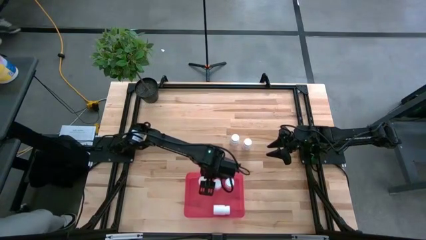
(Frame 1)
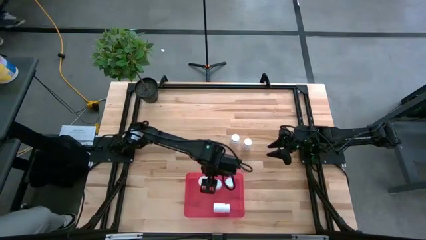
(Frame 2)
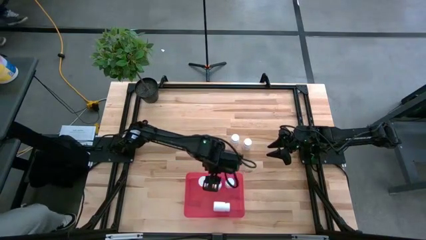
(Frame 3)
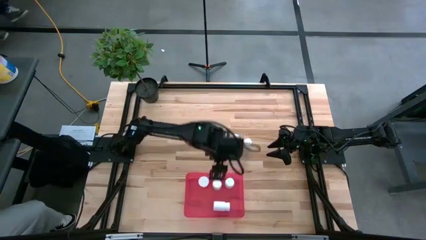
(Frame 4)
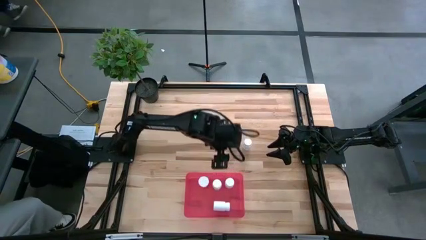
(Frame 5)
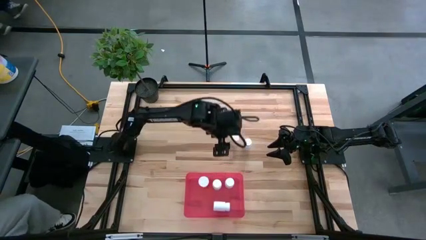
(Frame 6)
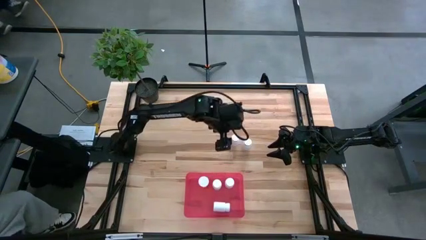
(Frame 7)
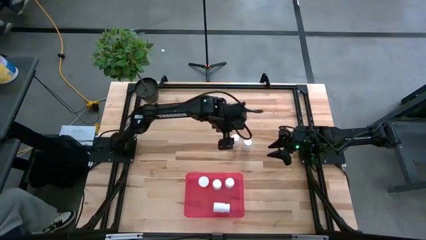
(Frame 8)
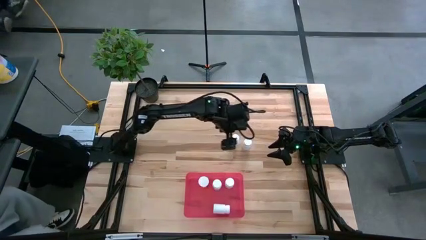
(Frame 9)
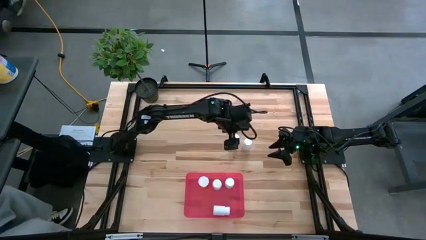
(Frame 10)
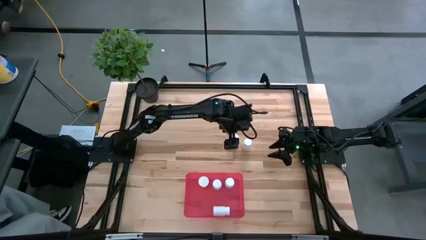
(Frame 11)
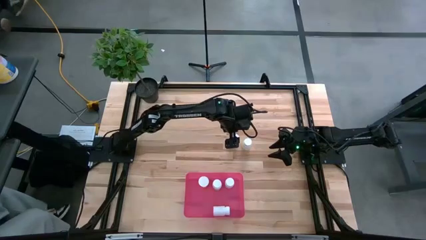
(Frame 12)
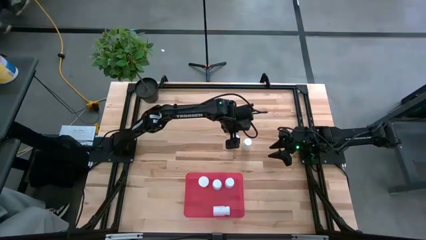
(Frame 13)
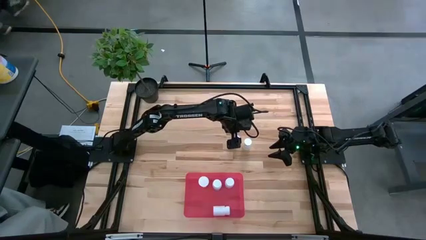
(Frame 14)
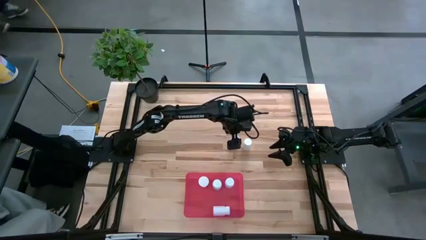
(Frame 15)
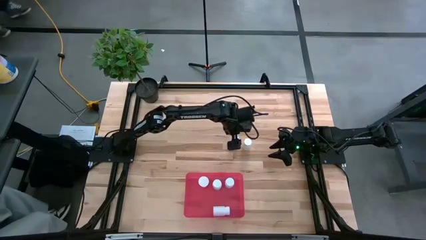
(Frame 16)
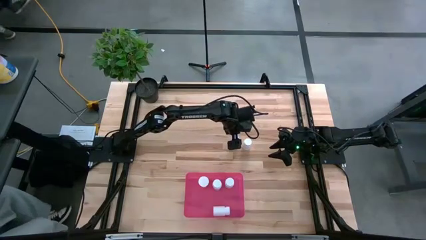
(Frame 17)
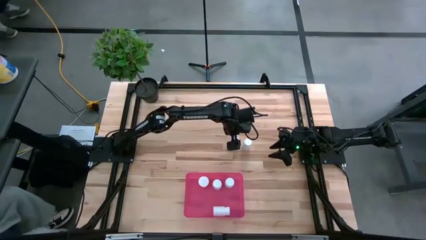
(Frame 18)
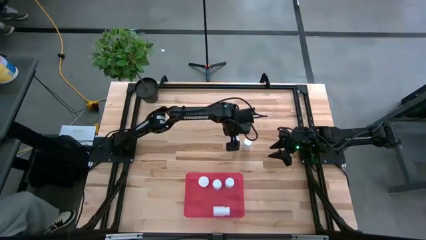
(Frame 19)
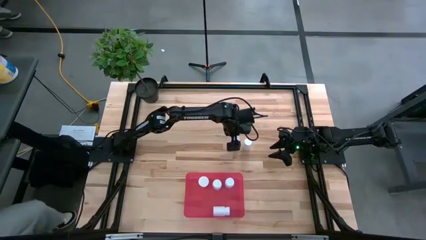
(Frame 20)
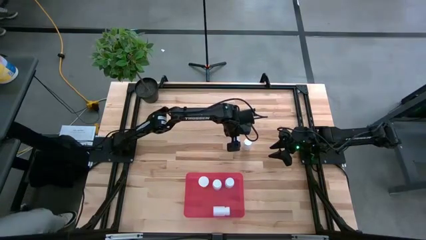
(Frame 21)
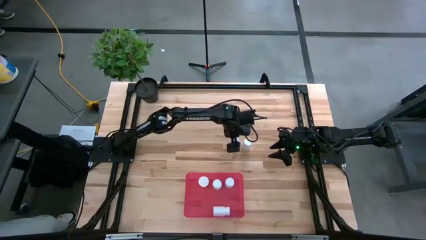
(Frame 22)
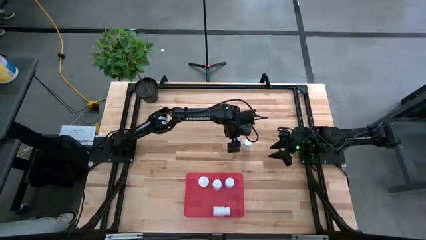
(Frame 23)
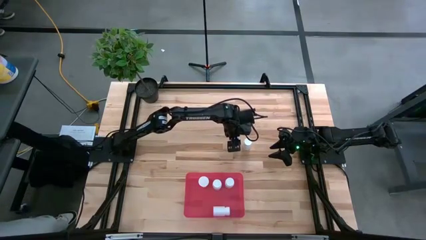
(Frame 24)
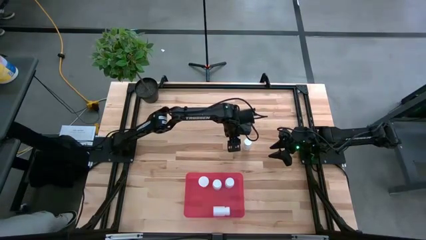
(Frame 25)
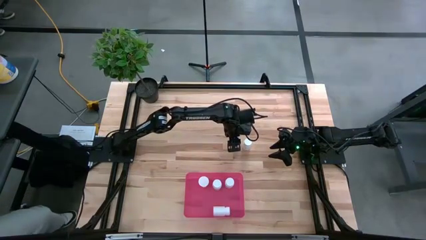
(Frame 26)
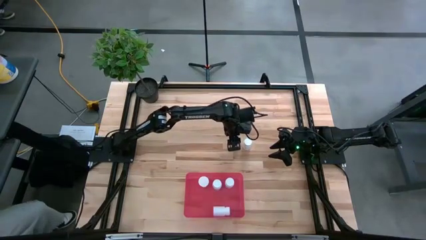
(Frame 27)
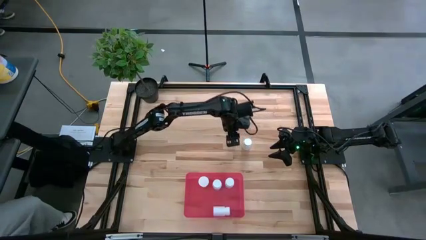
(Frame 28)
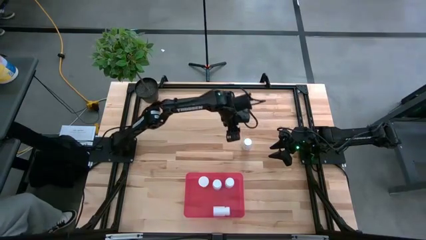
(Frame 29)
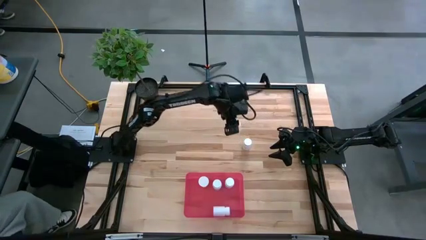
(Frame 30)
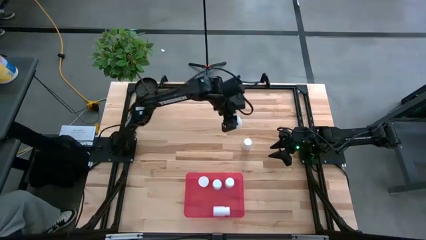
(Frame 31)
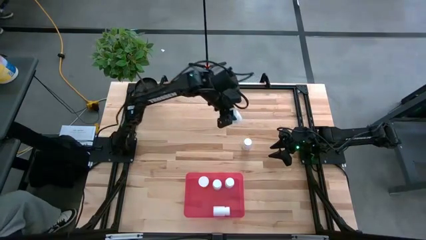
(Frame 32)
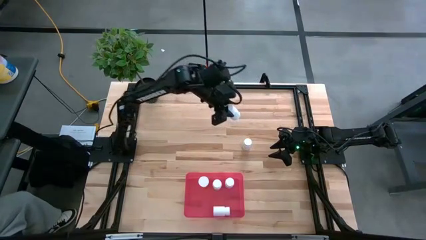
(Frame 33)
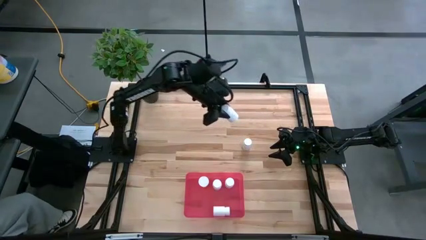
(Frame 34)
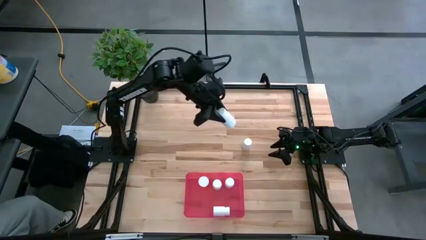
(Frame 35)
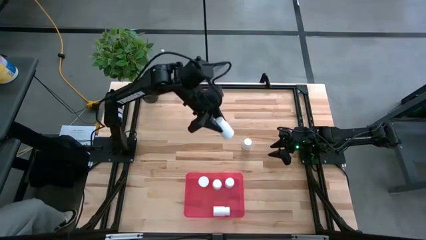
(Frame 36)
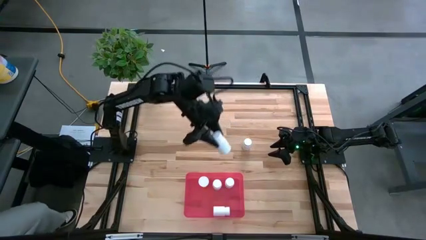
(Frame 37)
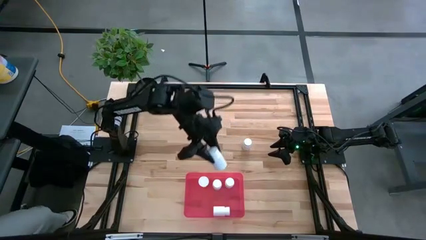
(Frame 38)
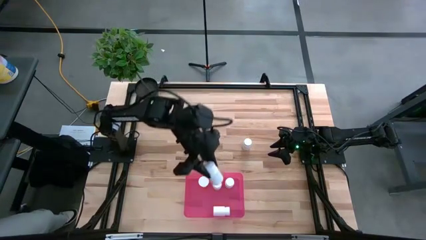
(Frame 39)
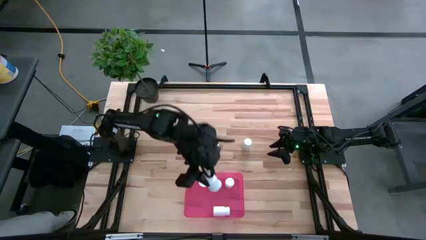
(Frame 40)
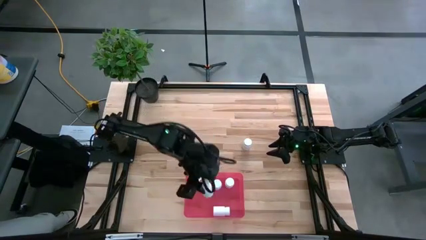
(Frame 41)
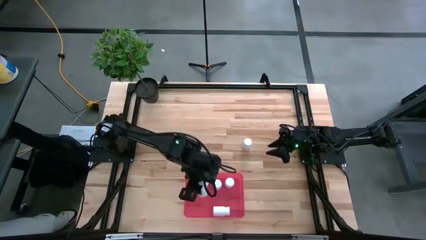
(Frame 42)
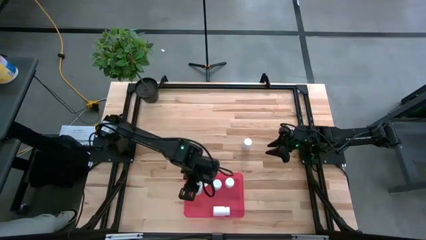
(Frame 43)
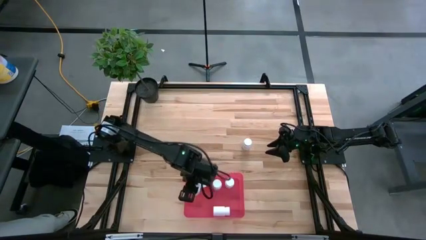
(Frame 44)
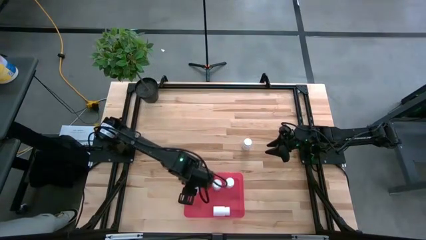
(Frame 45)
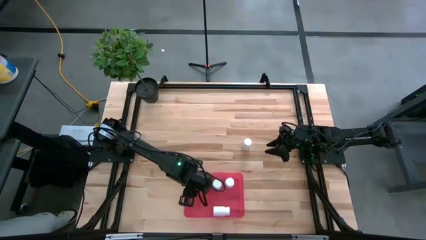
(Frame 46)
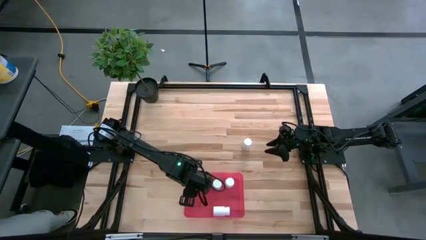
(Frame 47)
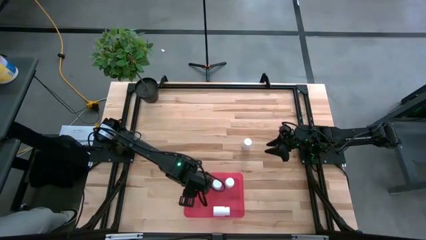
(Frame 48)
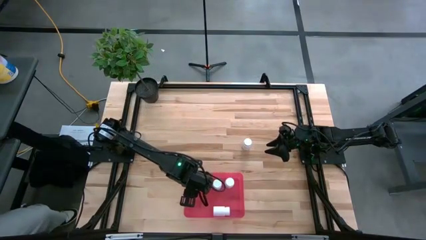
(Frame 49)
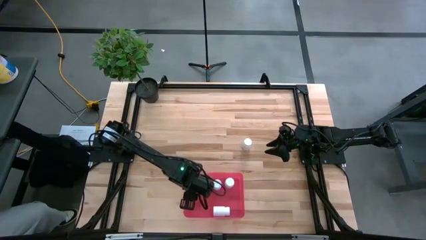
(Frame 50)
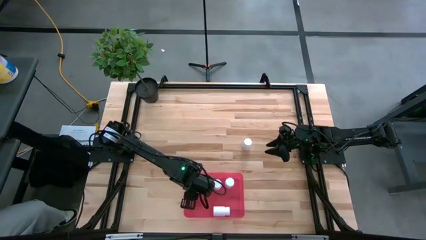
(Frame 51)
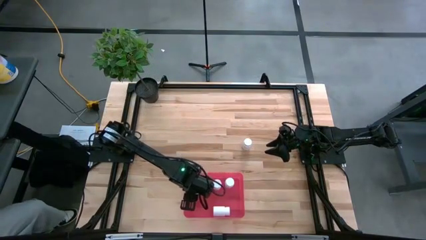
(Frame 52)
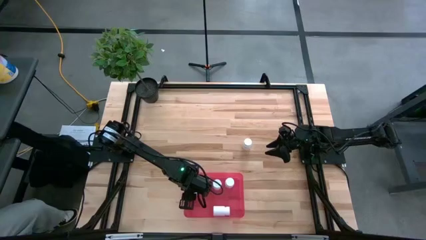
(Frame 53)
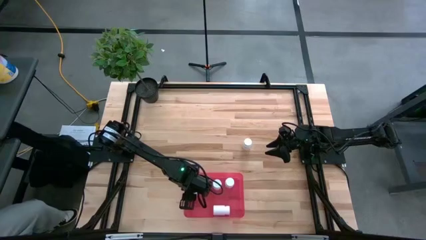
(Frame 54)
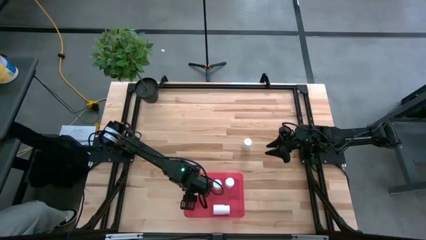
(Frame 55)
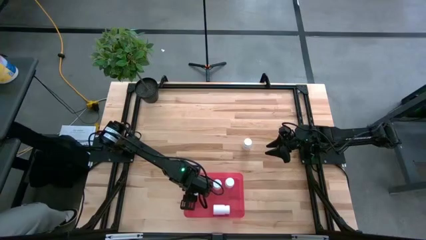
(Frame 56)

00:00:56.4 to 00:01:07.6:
Task: Pick and place pill bottles into a basket
Put the white pill bottle into the red bin

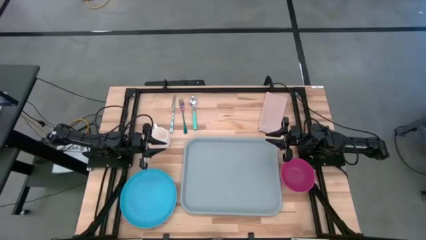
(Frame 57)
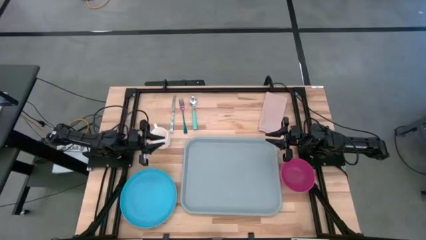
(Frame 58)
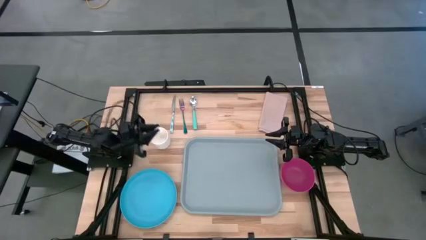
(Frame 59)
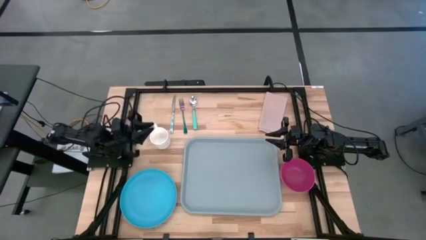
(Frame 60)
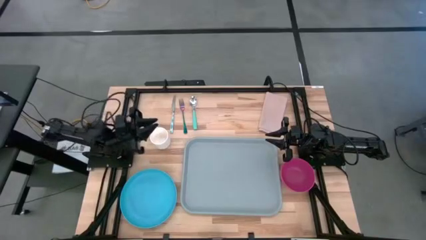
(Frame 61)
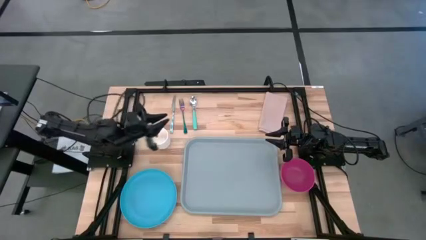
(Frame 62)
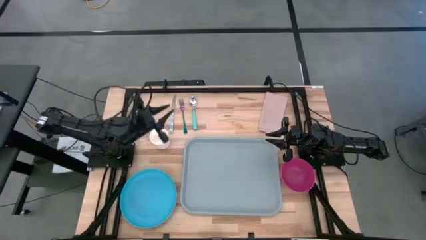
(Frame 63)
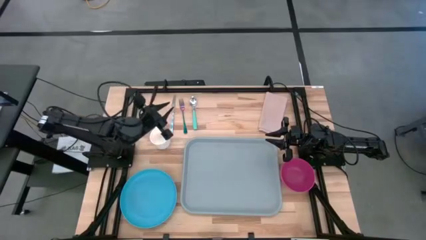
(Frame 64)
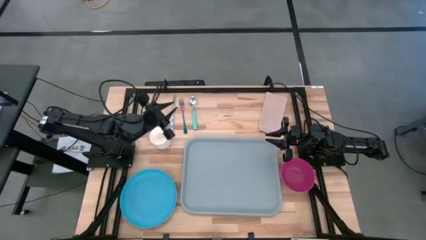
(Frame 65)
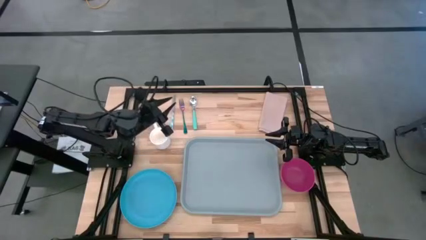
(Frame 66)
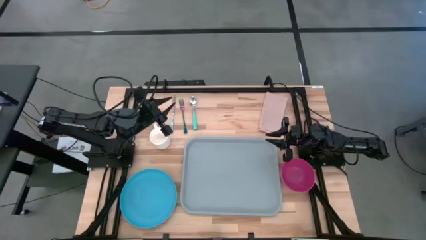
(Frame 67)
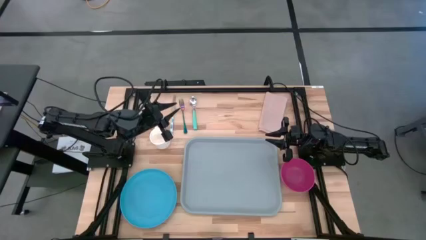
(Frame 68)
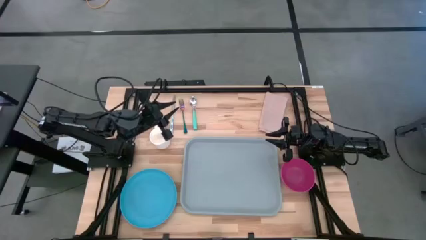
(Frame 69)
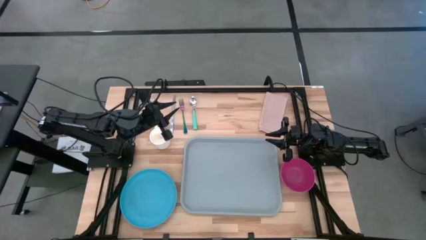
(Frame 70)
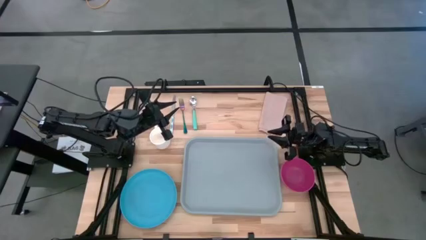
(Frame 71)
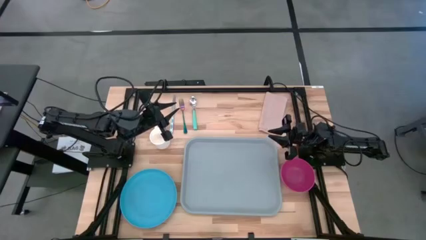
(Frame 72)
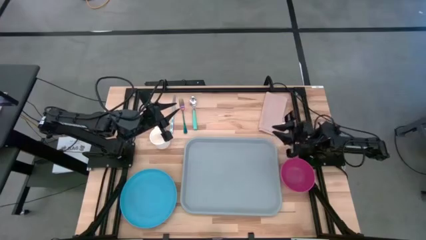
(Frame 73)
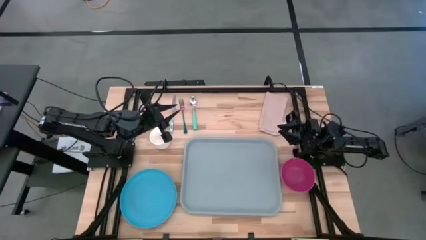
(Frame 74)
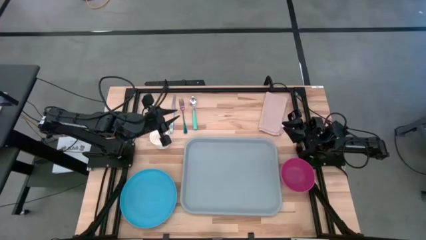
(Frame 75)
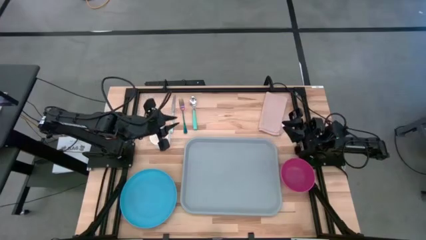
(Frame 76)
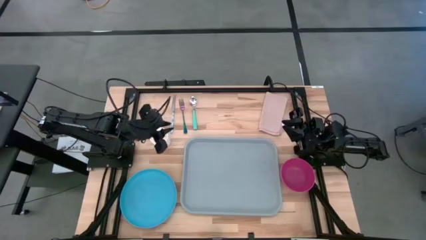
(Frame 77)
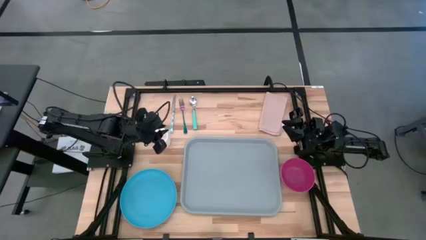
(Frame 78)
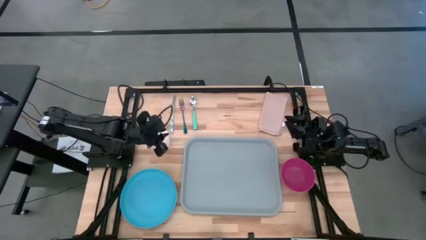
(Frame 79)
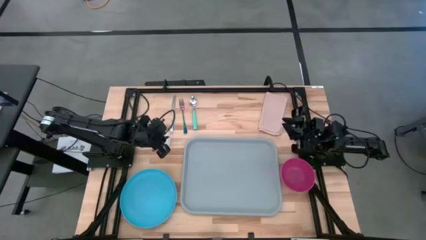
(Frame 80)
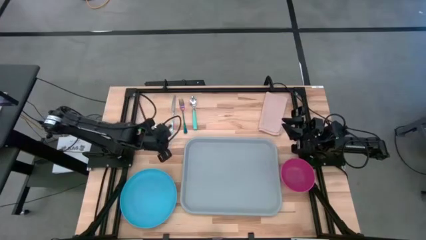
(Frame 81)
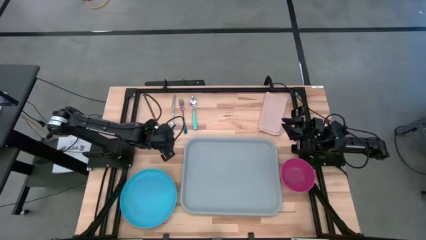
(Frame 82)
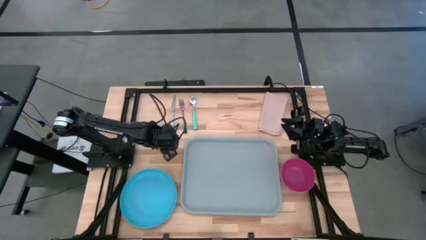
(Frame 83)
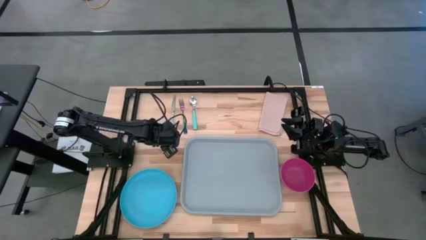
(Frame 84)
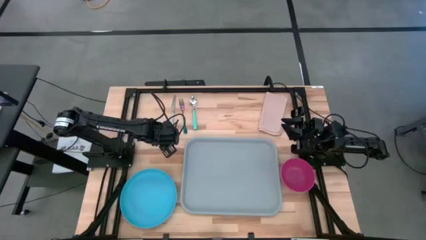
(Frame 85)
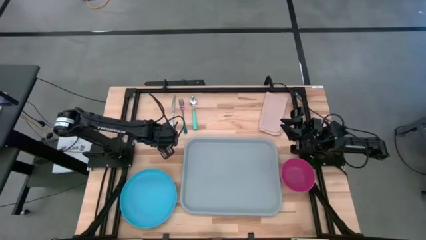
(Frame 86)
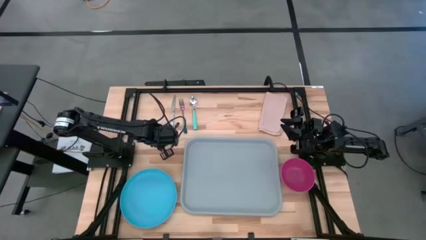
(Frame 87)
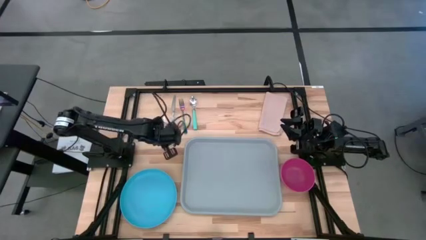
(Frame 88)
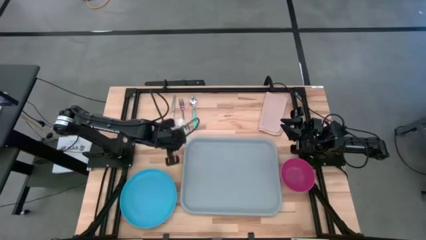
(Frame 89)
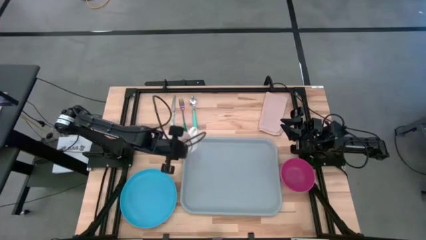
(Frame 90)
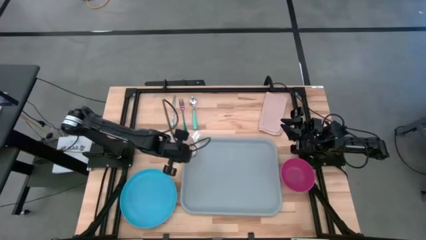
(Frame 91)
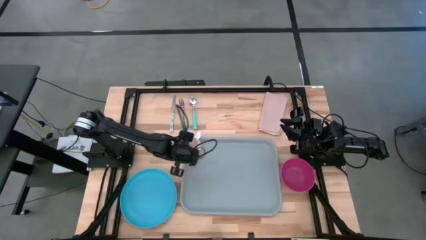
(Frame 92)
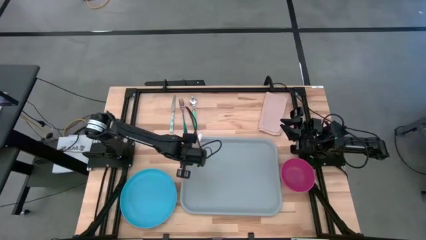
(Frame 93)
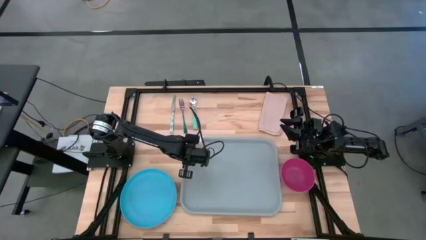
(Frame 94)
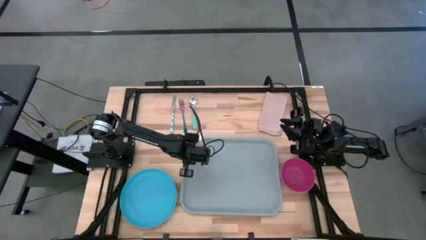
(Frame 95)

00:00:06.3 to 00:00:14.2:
Task: Set up tray
Put the white mug on the gray serving tray
